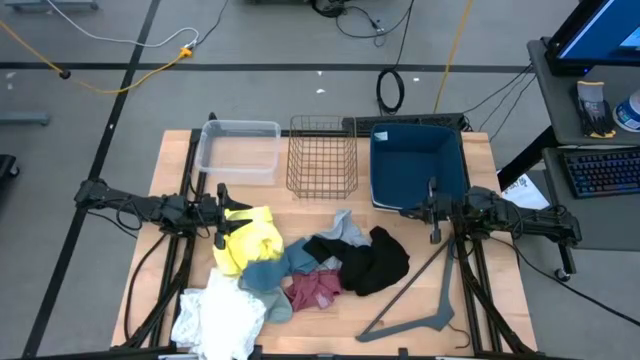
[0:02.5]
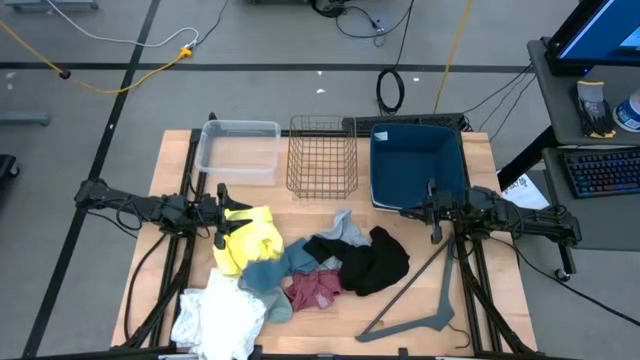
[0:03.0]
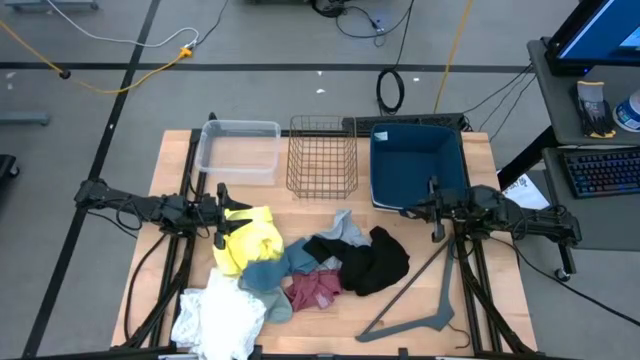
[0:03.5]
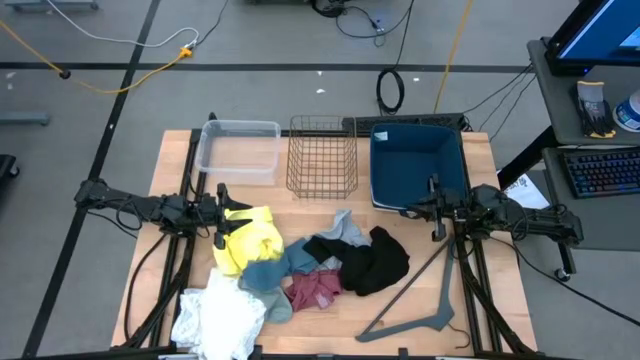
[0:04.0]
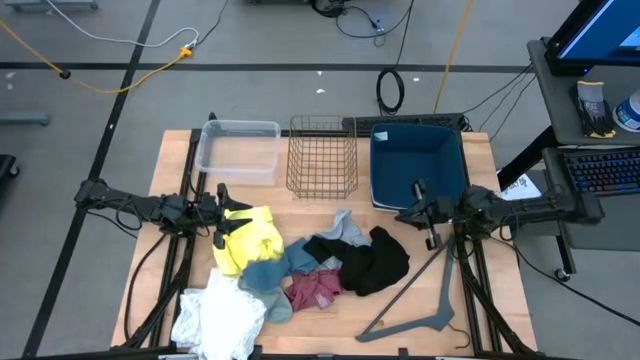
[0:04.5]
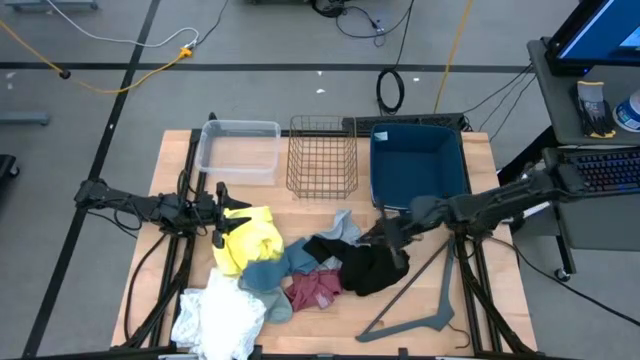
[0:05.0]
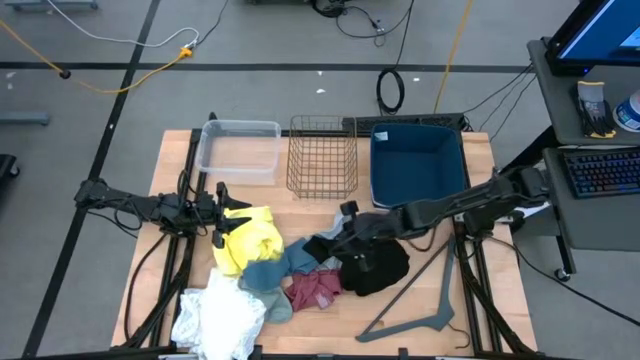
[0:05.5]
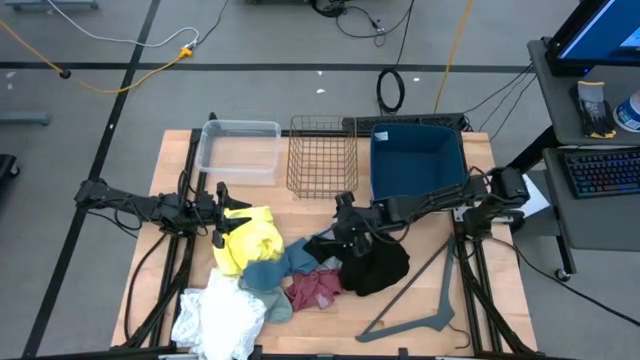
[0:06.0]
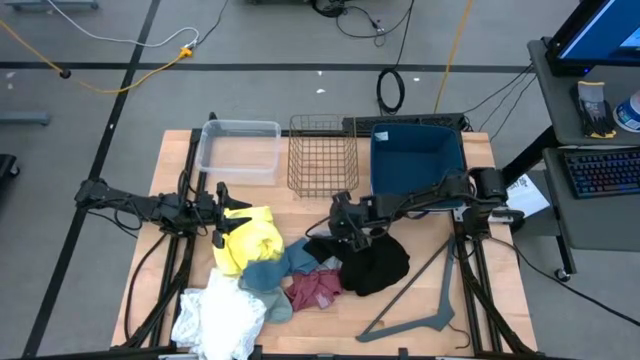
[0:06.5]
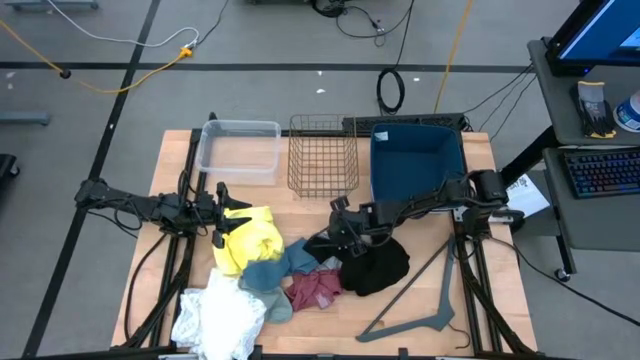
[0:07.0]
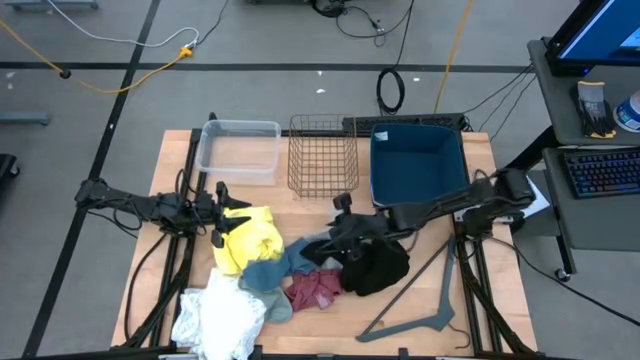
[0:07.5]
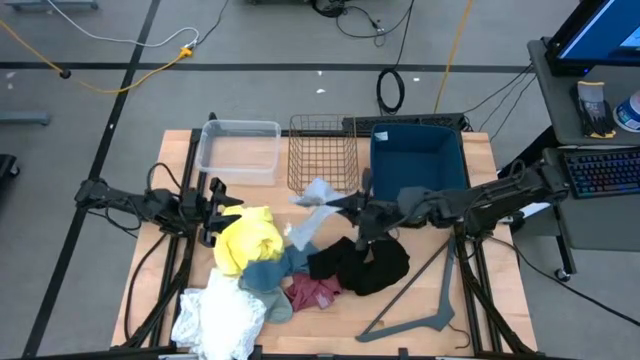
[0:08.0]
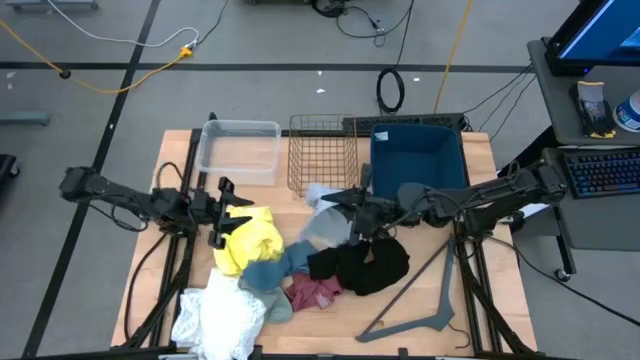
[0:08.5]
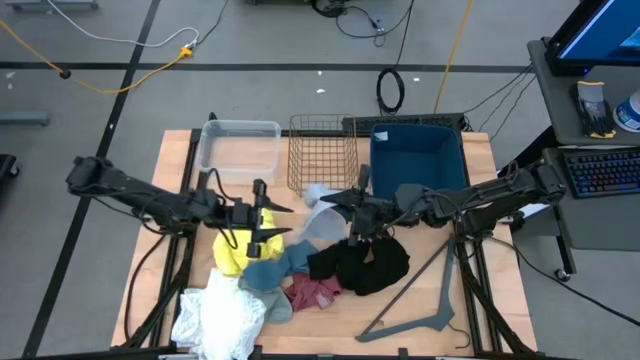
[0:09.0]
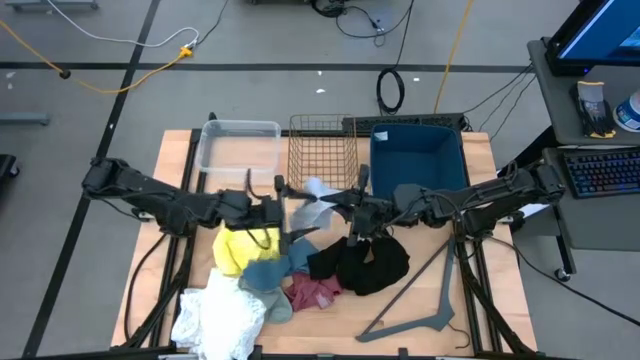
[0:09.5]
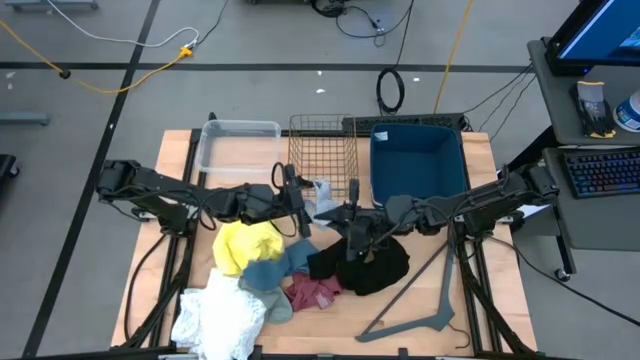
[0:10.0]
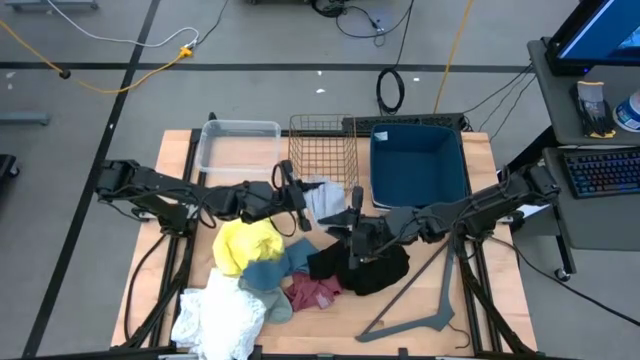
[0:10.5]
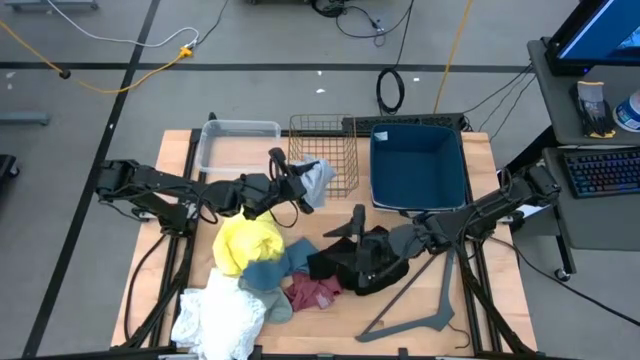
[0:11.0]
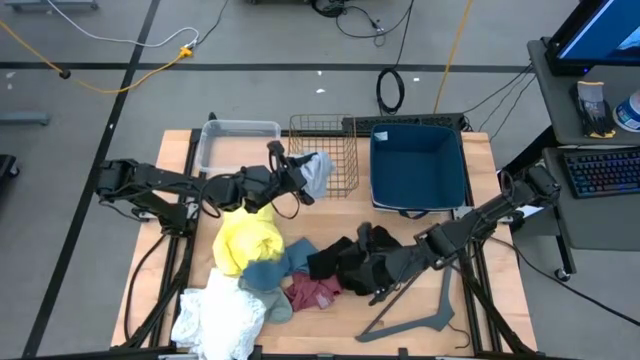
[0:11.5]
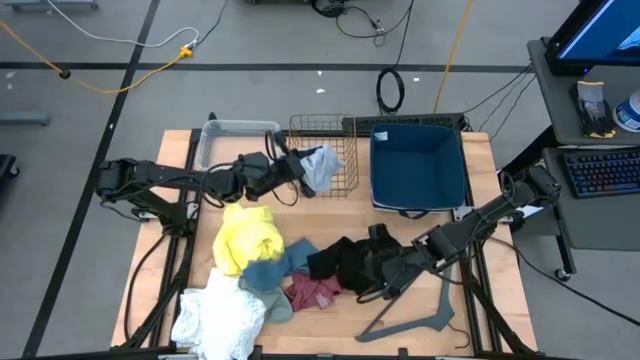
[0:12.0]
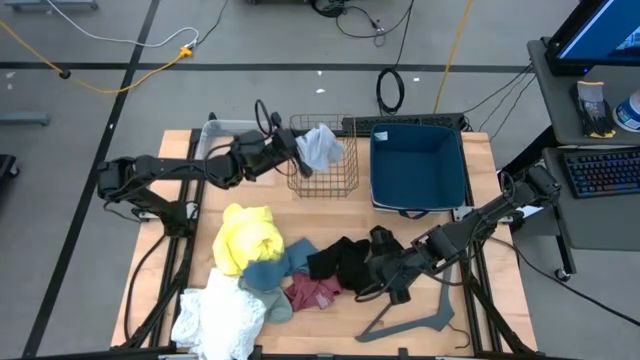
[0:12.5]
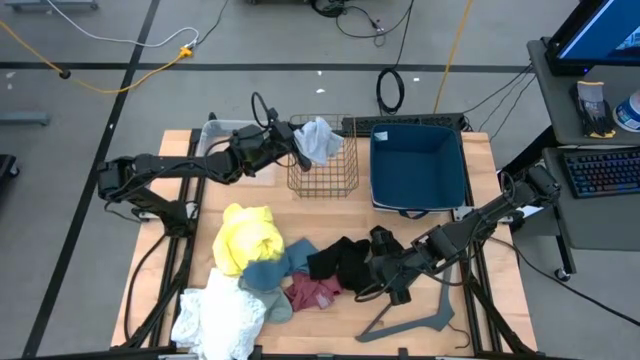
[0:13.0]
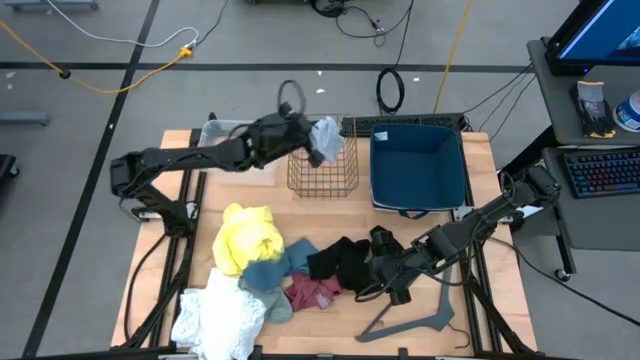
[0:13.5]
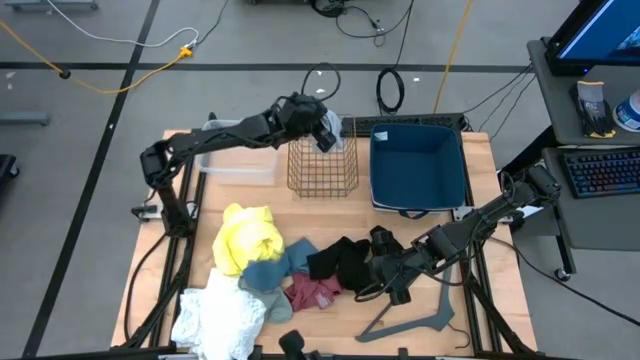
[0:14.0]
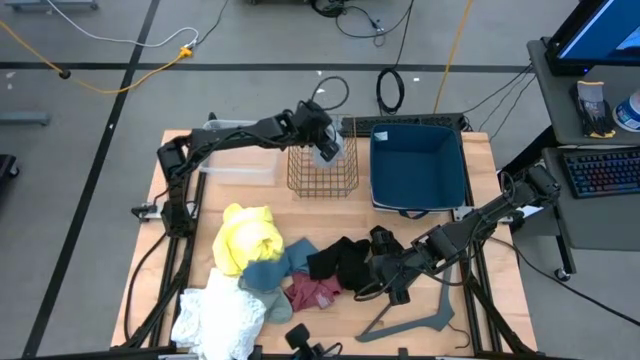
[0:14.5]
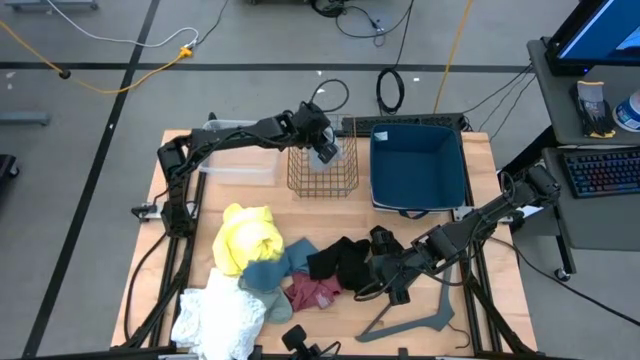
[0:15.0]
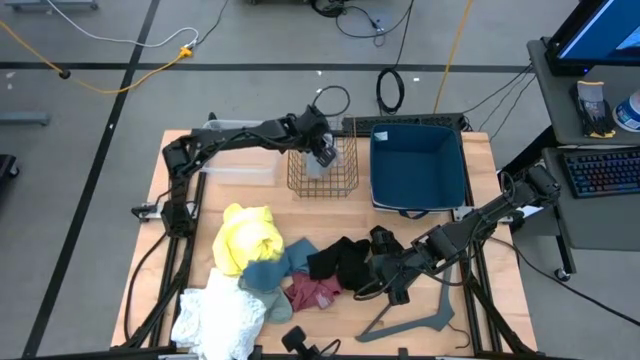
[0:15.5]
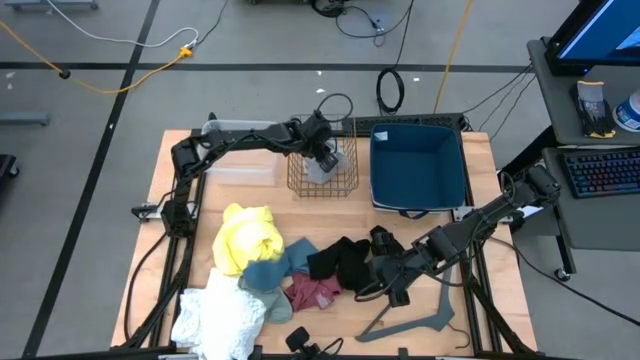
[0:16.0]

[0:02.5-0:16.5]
Task: Pick & Place Cloths
Put the gray shorts into the wire basket

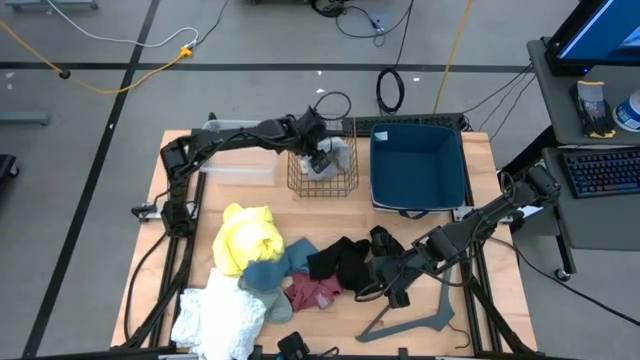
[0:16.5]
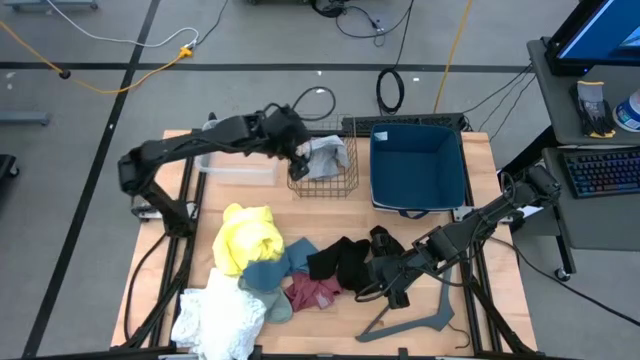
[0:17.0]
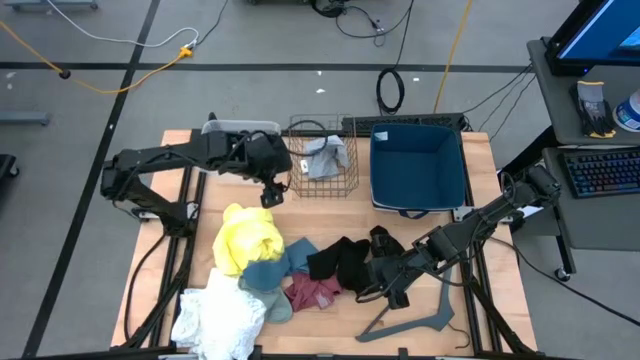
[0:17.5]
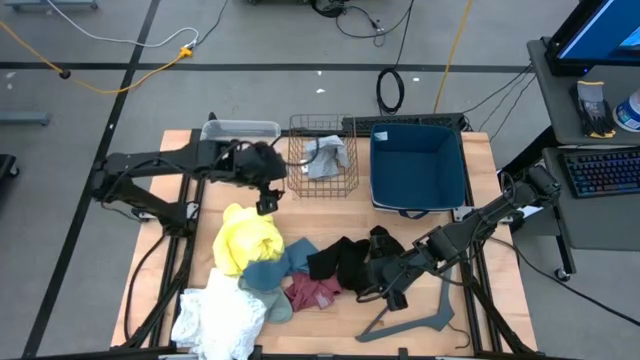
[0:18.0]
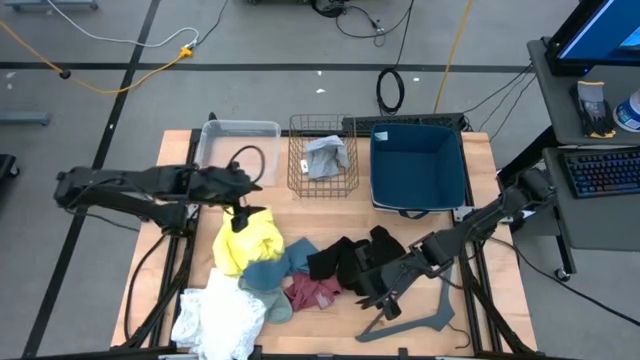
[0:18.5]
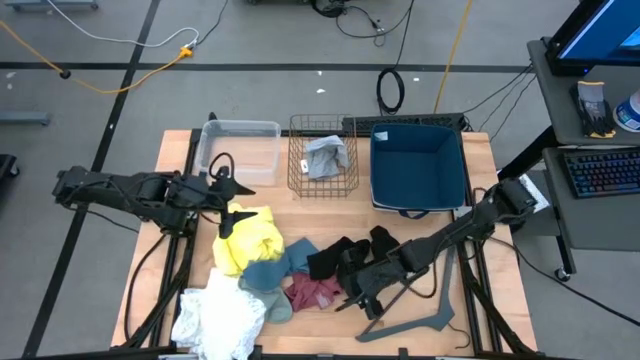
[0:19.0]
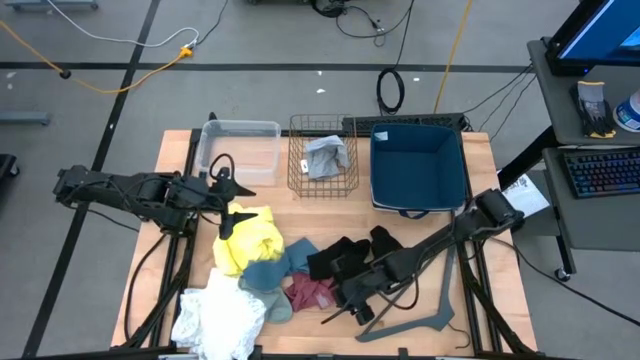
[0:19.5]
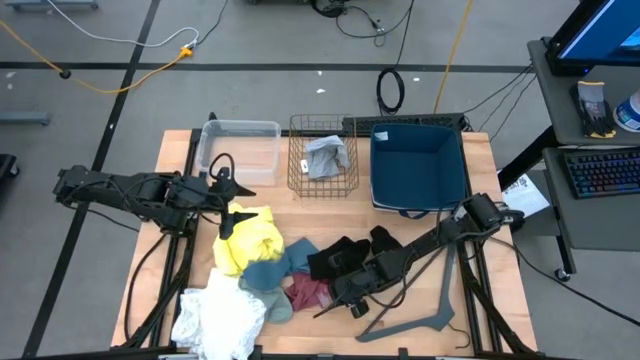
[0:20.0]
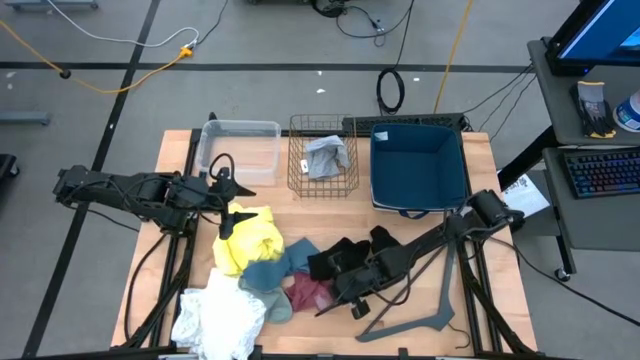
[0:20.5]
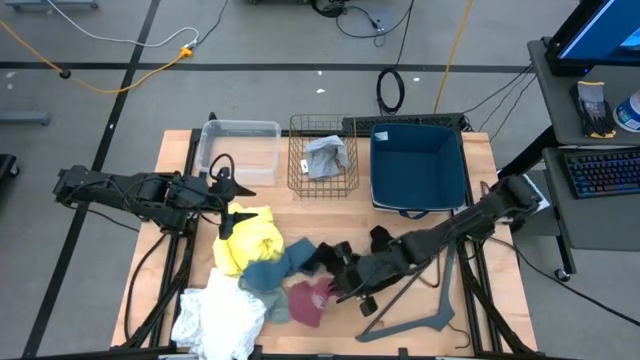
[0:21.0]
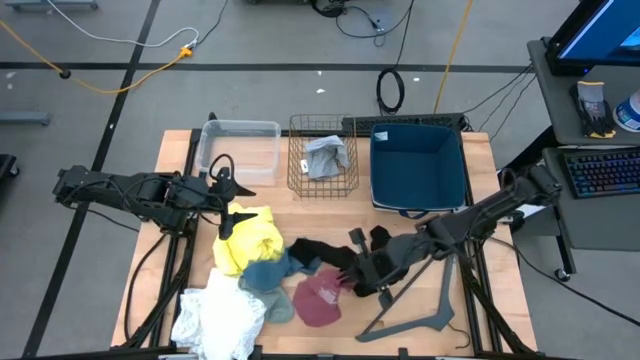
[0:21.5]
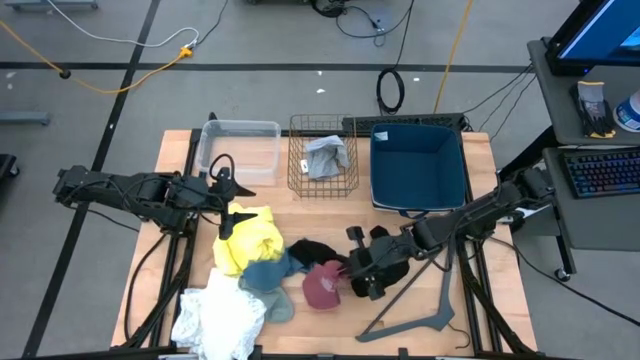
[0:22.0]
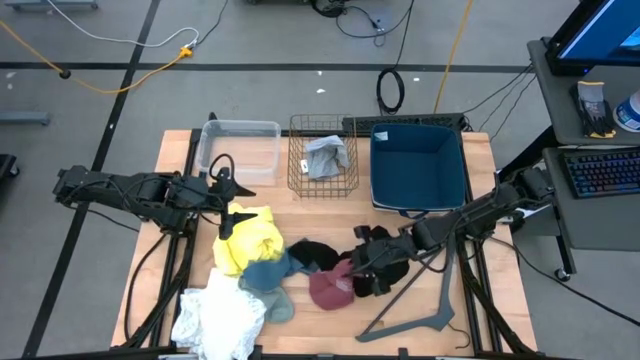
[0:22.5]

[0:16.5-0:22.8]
Put the red underwear into the wire basket
